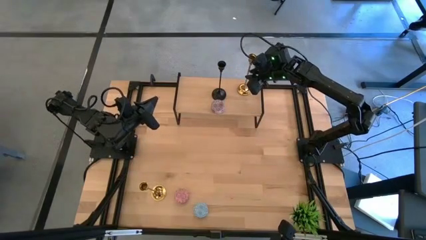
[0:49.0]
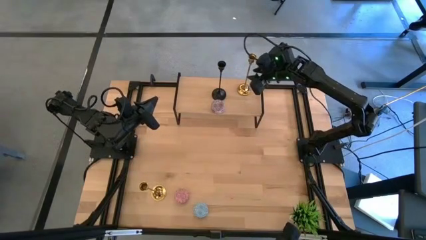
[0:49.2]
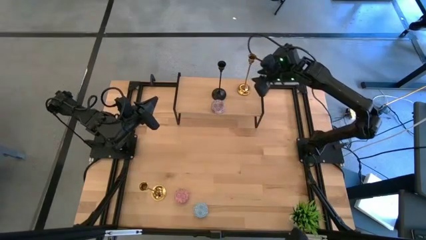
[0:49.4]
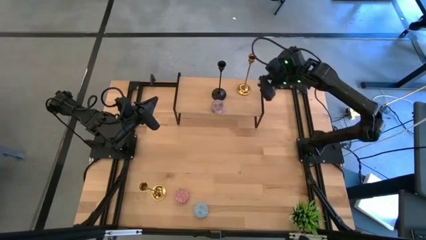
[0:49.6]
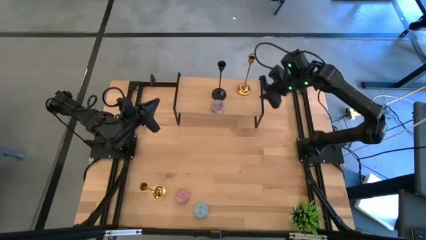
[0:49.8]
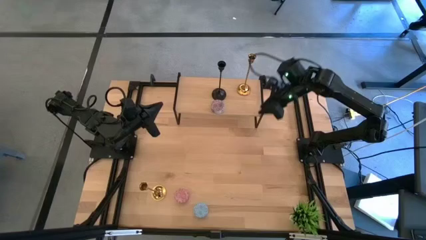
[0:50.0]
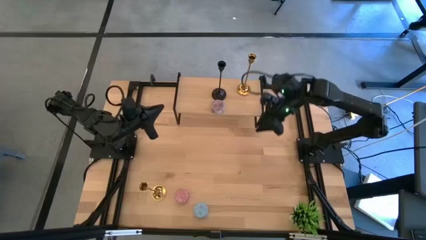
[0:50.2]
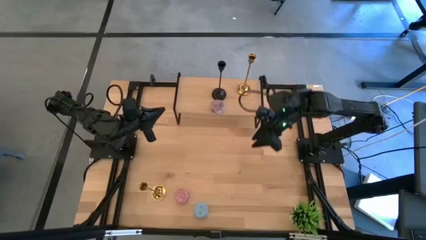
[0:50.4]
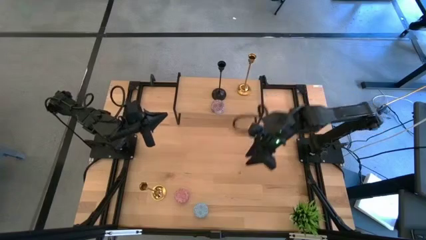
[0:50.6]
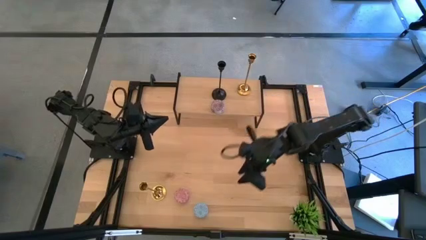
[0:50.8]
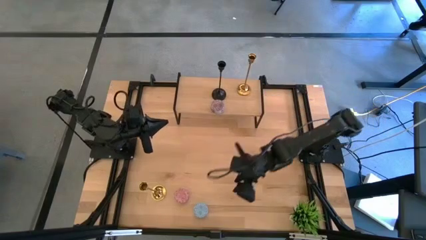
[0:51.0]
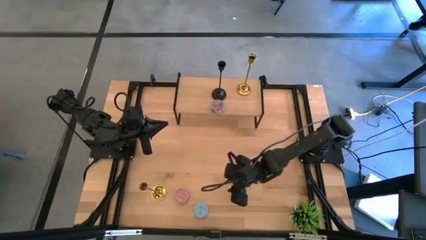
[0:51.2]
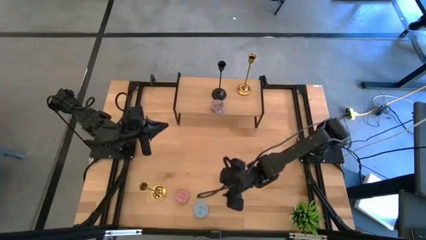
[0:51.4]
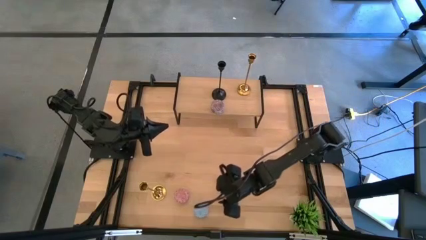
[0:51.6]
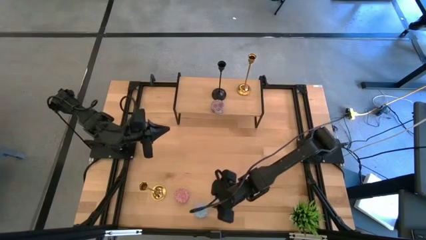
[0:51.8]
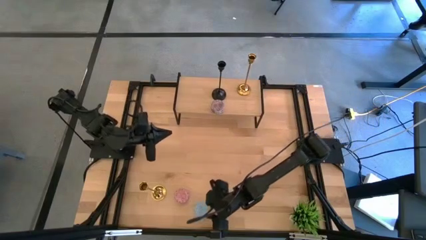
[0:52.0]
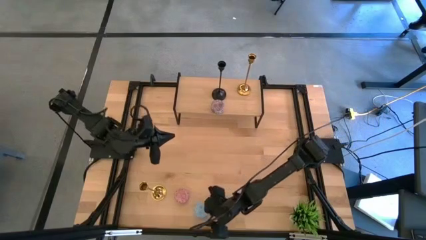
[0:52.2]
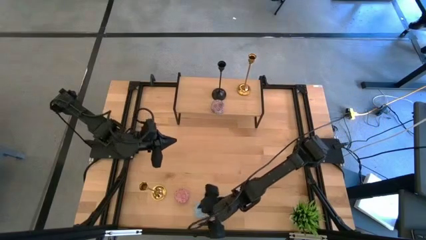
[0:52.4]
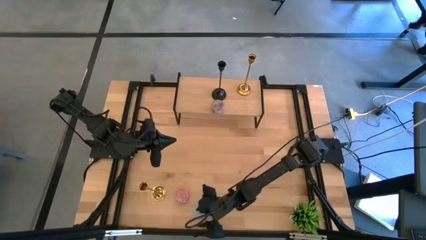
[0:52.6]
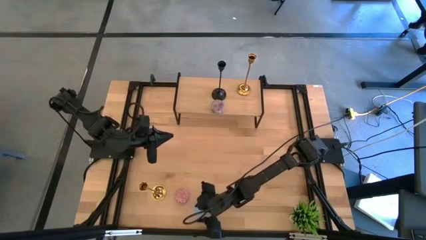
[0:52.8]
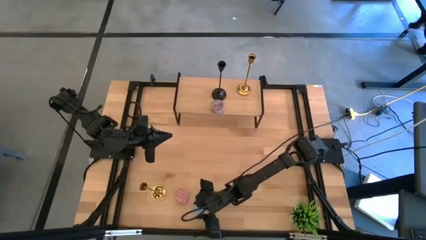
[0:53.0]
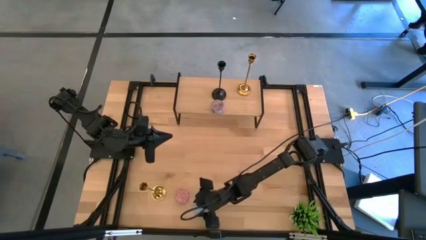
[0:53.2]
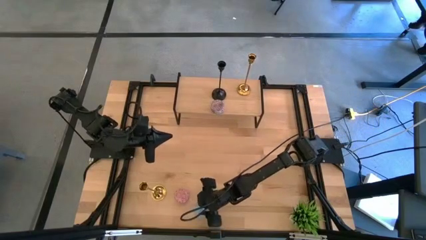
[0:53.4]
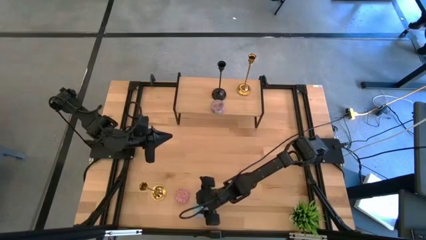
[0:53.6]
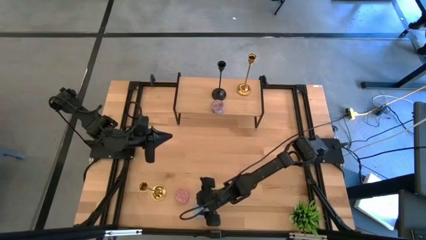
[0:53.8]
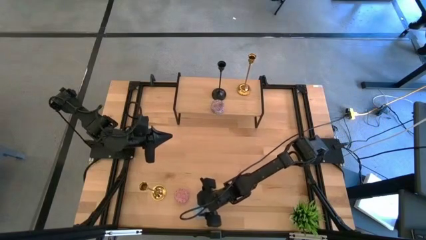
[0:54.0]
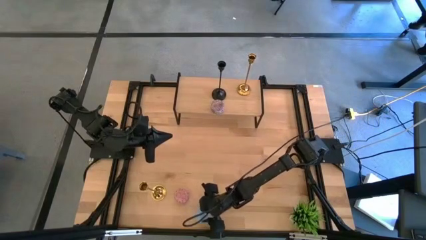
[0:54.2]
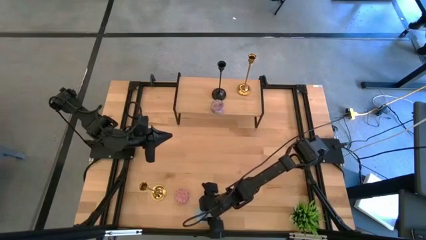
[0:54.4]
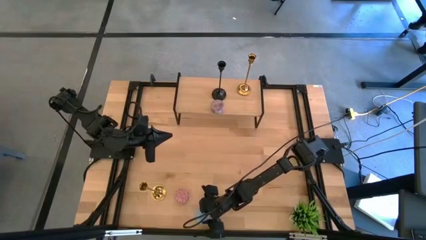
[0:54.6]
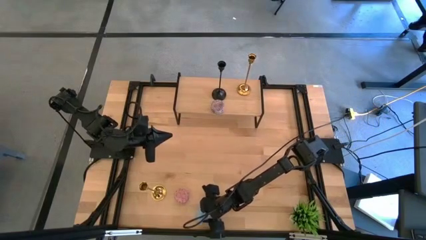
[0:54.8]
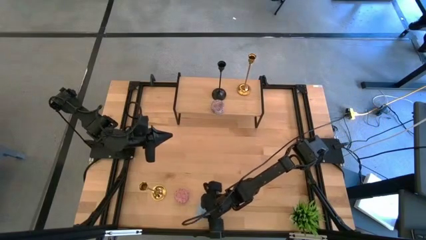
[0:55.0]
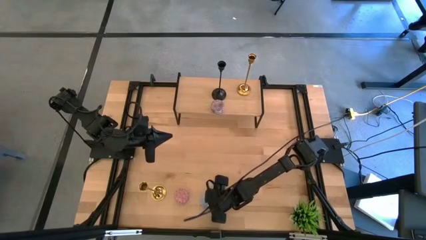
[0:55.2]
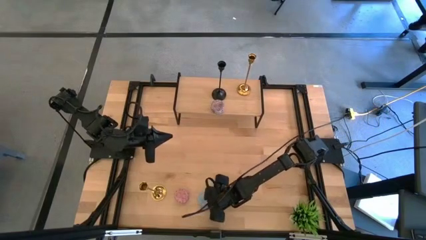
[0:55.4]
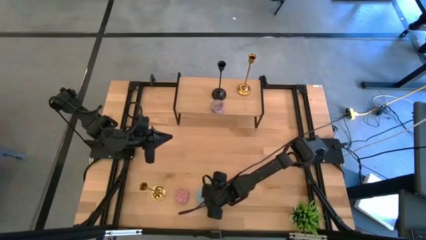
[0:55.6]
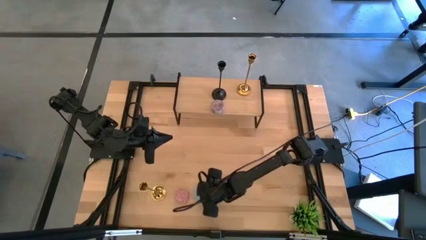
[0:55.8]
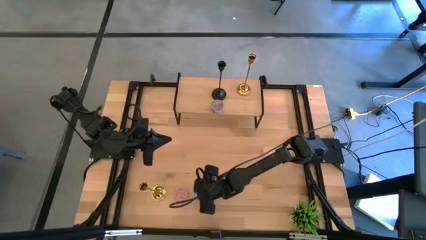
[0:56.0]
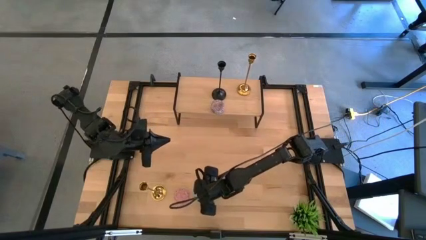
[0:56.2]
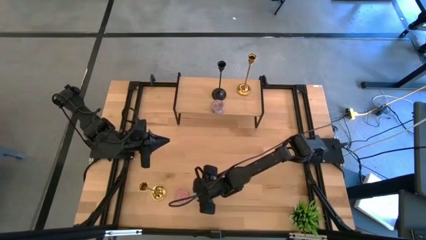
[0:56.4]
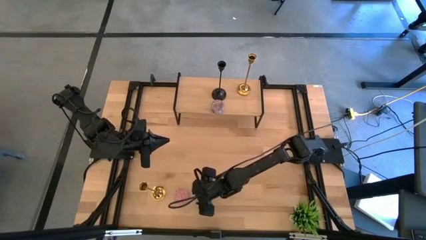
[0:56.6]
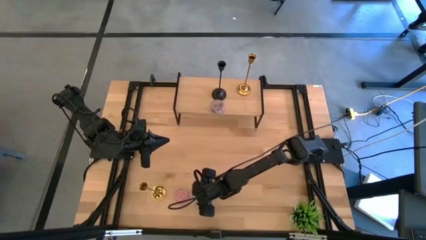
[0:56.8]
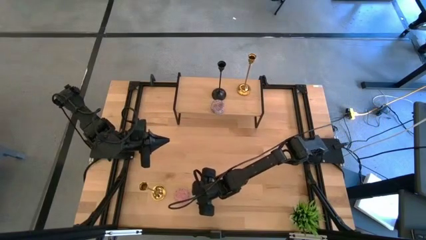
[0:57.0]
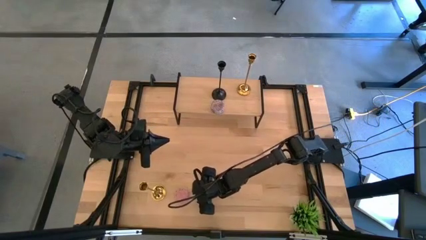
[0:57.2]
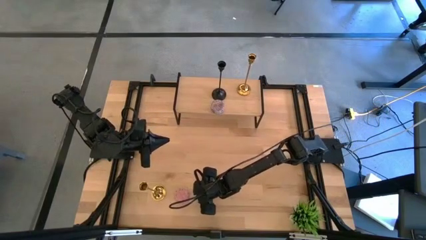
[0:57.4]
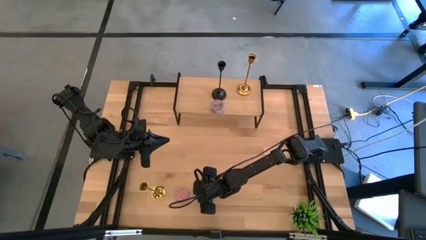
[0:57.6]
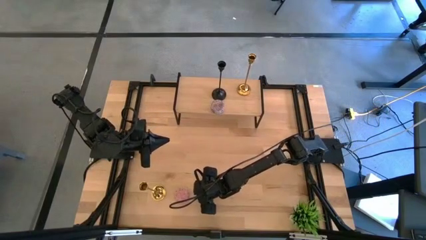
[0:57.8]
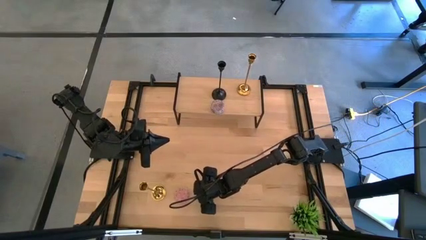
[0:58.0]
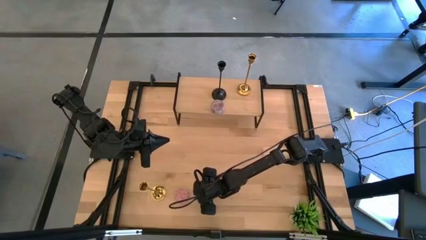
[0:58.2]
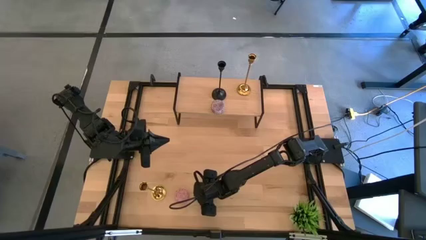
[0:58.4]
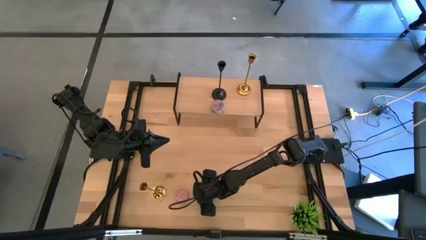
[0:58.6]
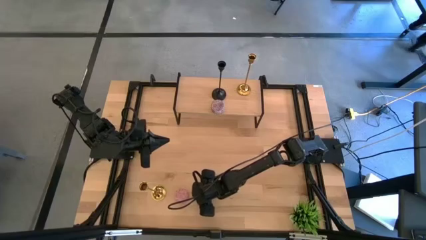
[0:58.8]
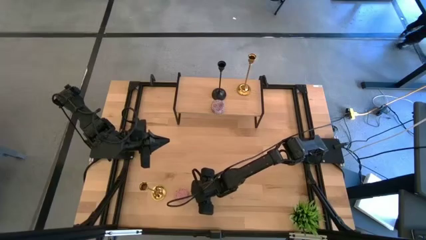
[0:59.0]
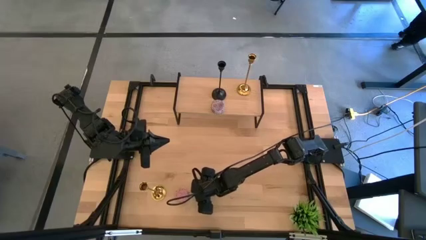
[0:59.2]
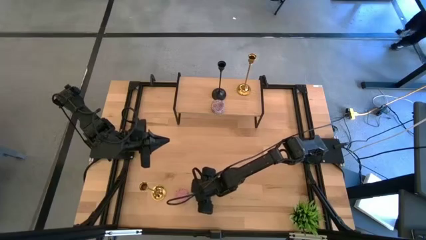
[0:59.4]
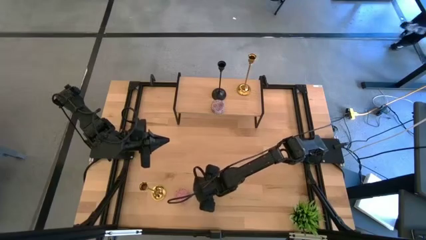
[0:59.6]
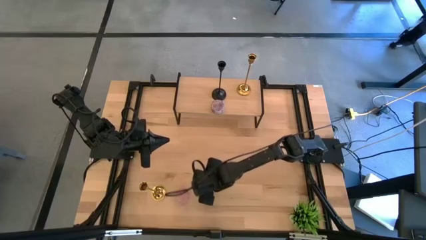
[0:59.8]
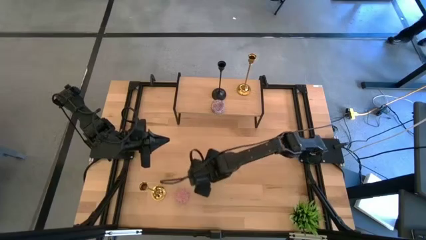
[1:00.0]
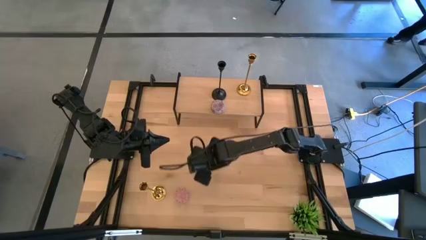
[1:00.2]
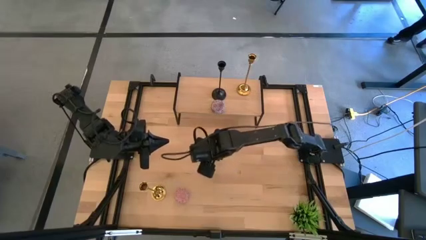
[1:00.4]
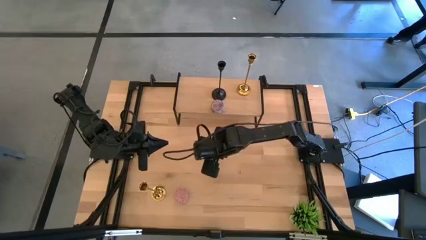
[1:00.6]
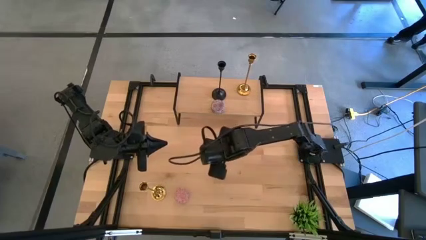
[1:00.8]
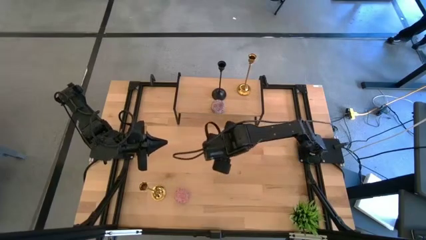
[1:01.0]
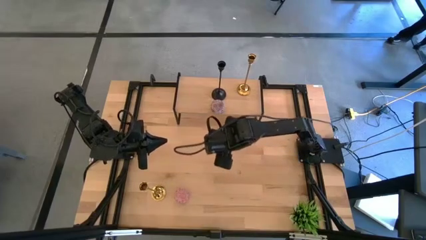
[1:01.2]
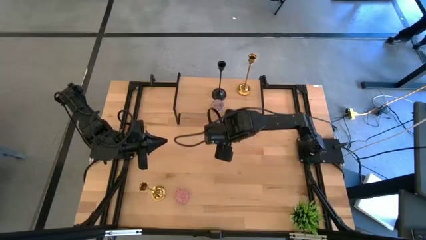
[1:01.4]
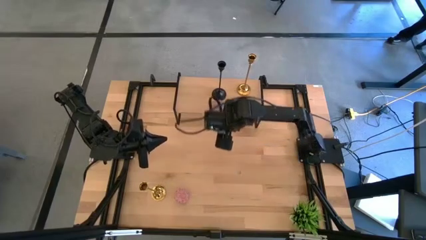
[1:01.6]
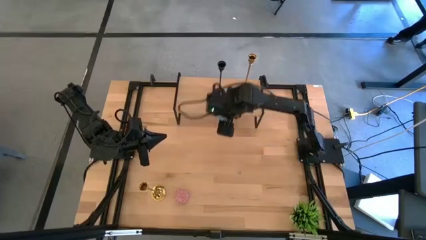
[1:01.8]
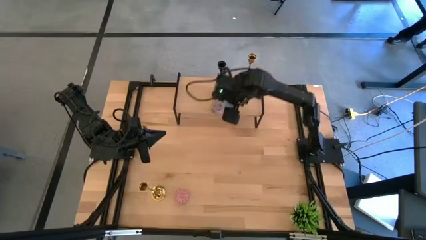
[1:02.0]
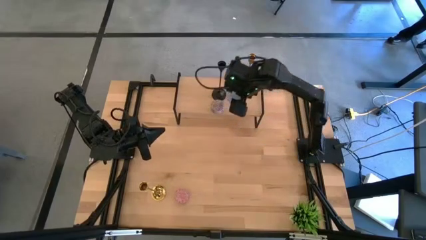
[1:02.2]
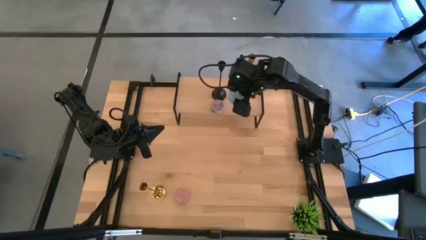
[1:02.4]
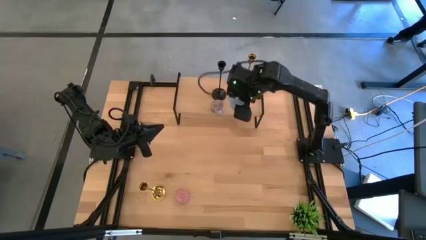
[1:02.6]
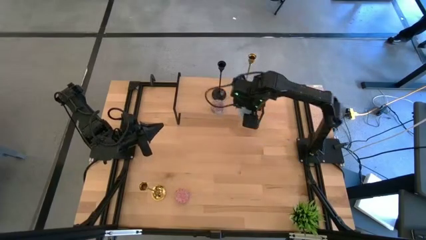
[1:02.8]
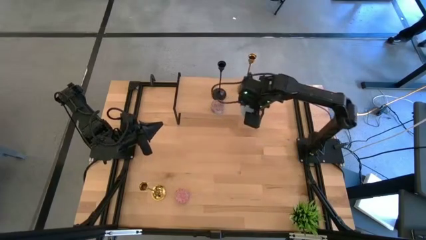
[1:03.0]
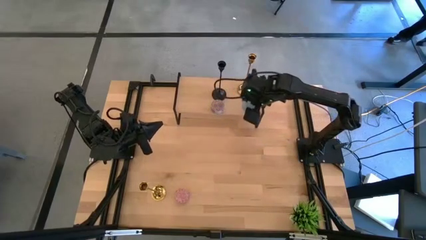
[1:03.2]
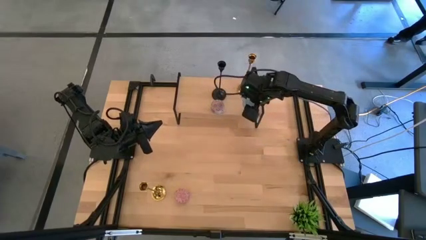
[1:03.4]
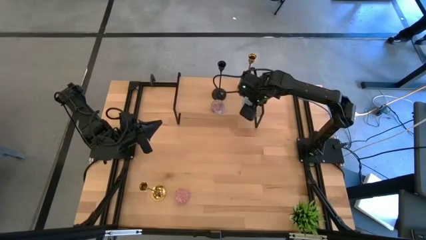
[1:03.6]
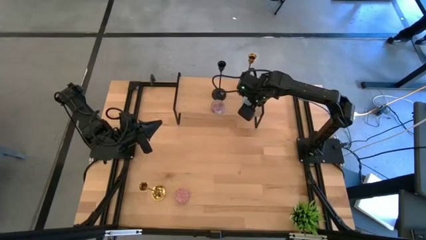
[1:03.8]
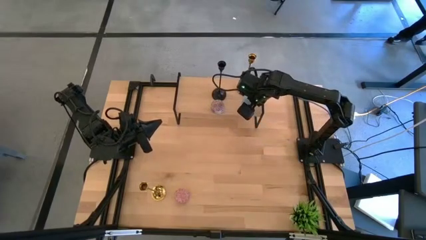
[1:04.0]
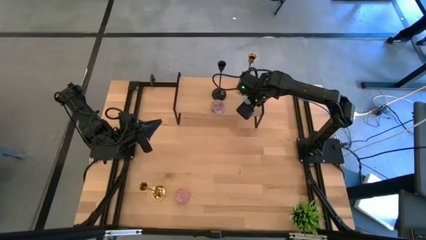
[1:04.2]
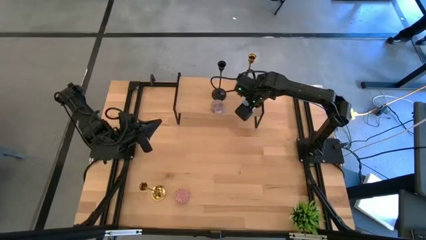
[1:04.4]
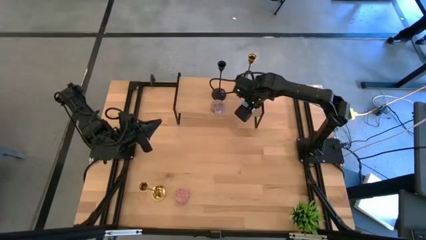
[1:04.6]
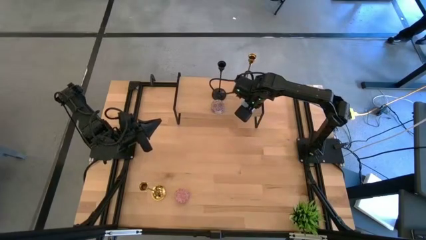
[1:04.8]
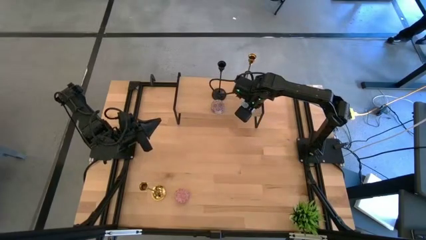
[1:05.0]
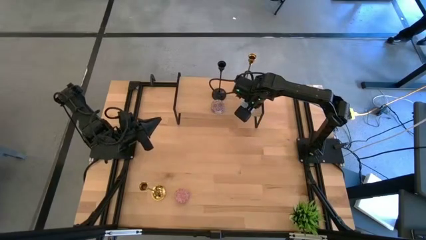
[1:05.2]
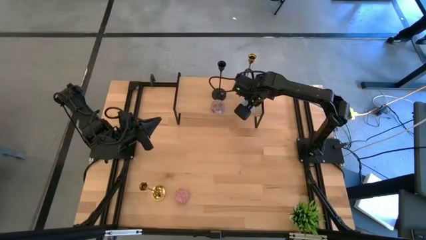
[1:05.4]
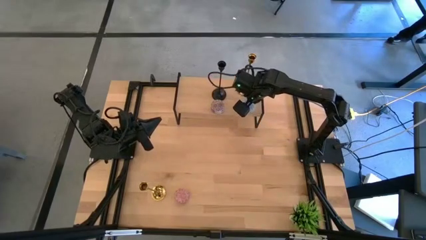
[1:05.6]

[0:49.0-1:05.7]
Task: Pick & Place candle stick holders
Put the blue candle on the shelf
